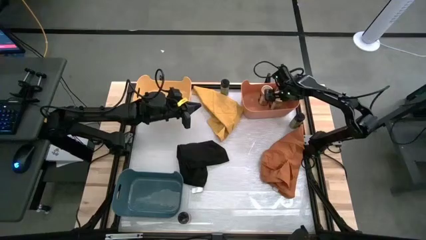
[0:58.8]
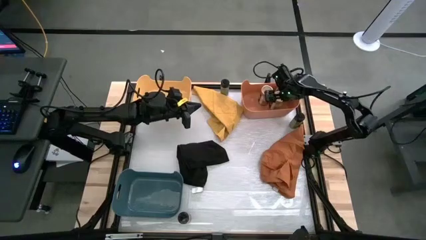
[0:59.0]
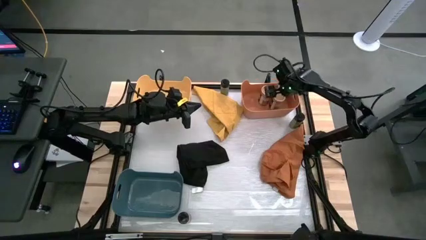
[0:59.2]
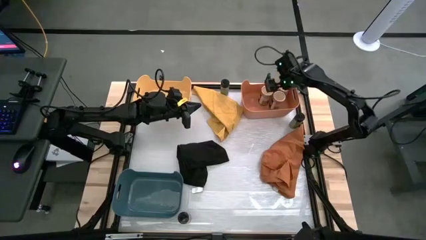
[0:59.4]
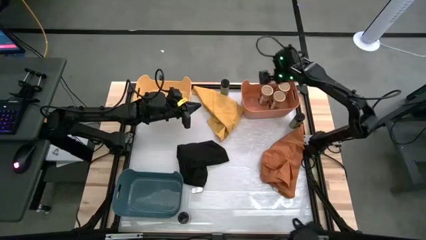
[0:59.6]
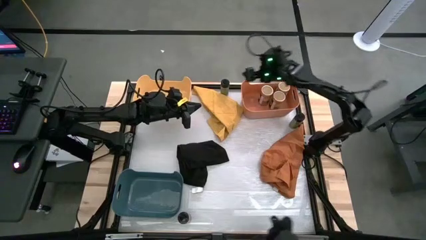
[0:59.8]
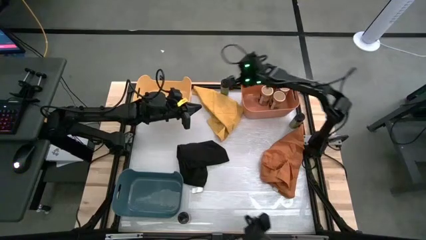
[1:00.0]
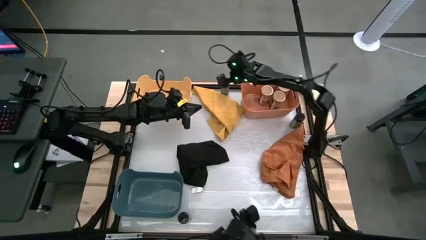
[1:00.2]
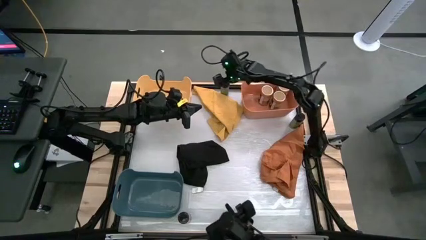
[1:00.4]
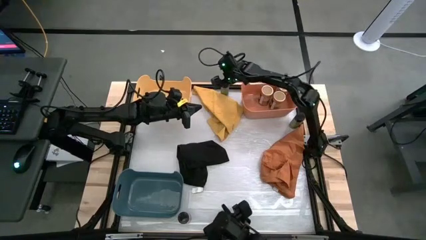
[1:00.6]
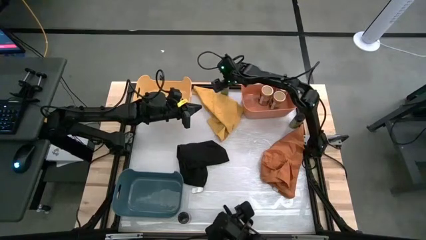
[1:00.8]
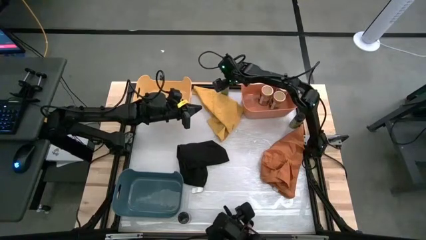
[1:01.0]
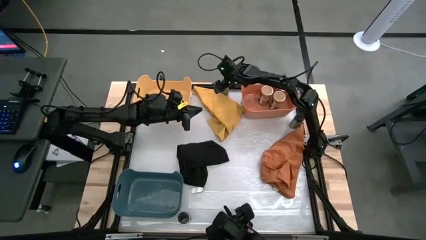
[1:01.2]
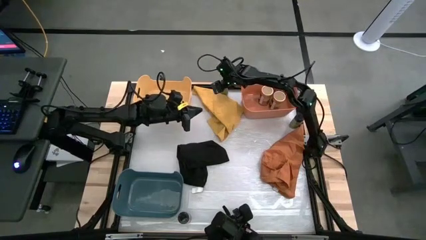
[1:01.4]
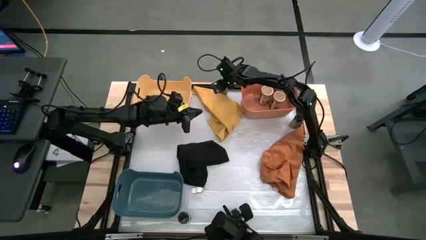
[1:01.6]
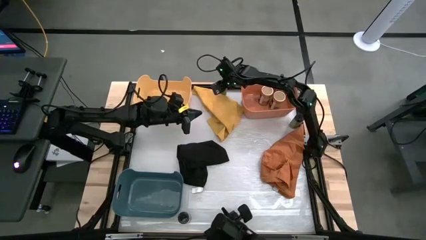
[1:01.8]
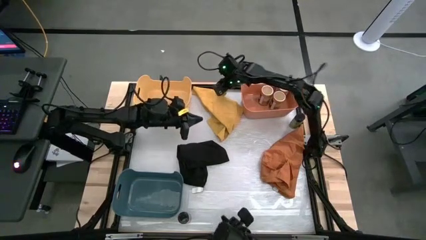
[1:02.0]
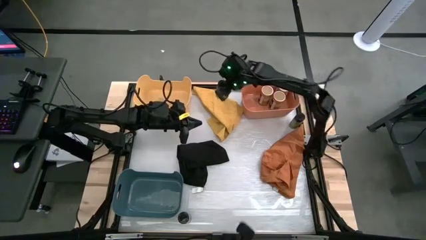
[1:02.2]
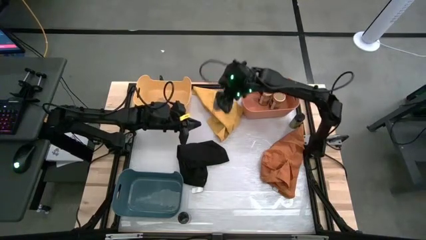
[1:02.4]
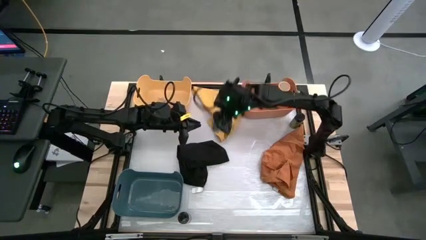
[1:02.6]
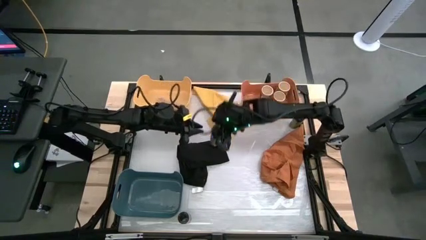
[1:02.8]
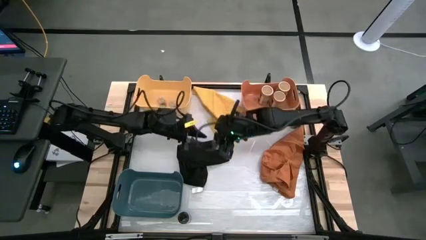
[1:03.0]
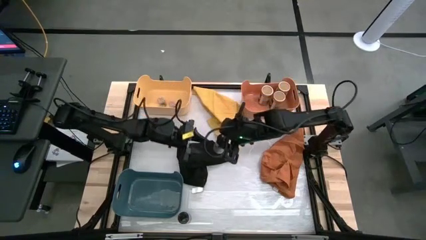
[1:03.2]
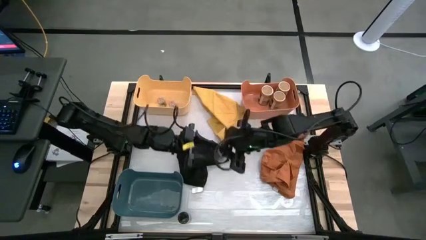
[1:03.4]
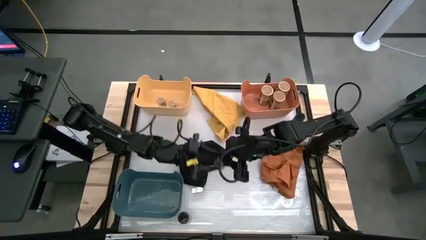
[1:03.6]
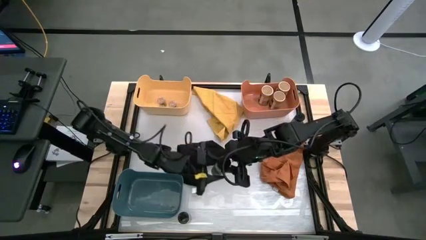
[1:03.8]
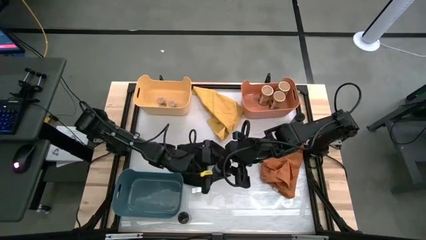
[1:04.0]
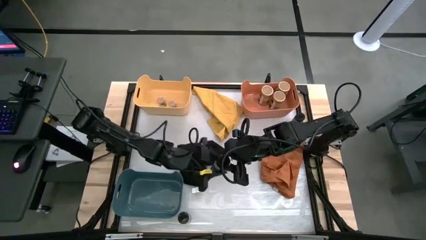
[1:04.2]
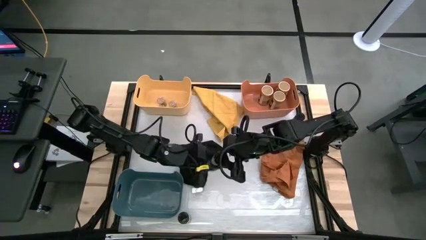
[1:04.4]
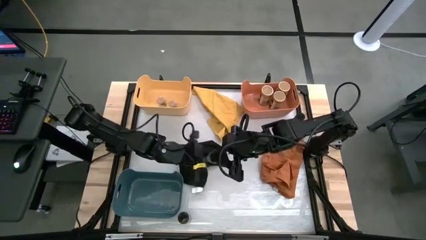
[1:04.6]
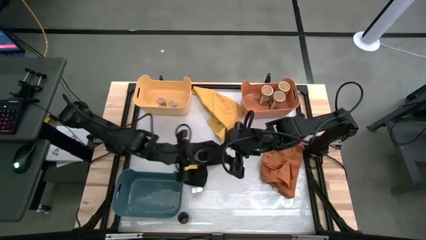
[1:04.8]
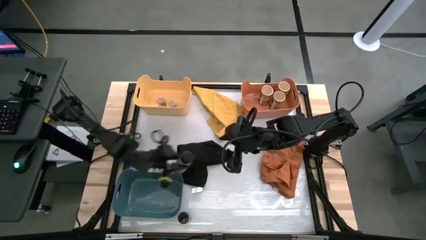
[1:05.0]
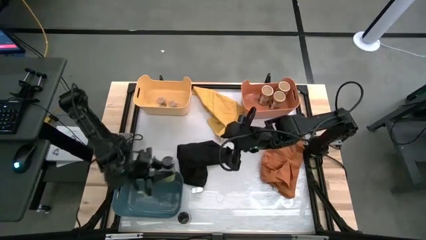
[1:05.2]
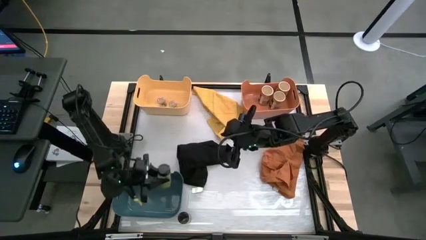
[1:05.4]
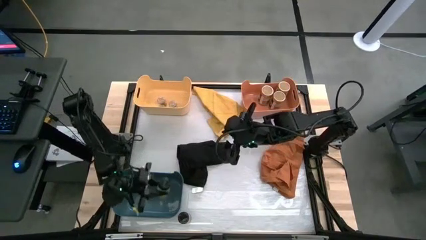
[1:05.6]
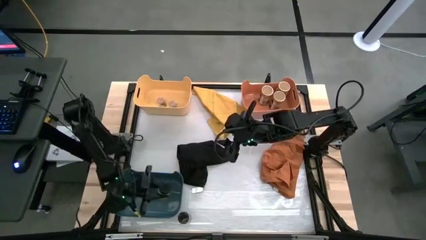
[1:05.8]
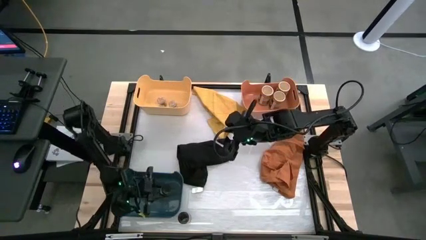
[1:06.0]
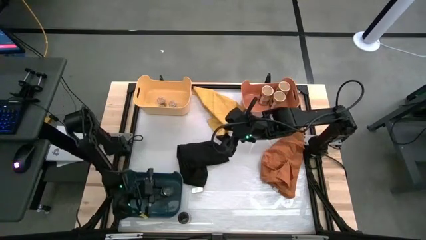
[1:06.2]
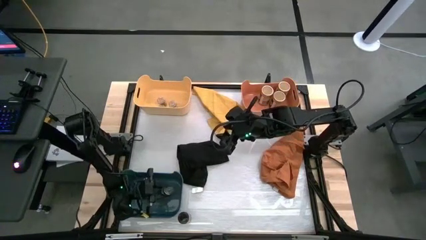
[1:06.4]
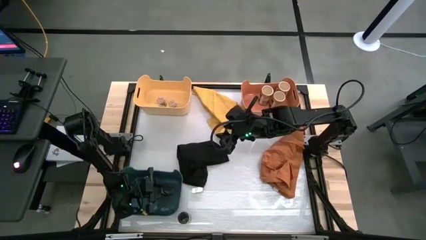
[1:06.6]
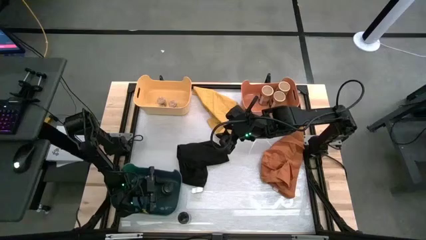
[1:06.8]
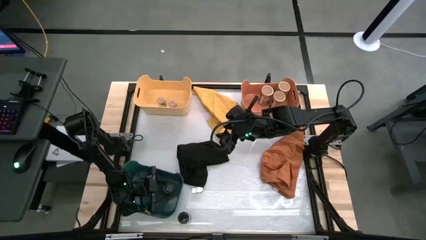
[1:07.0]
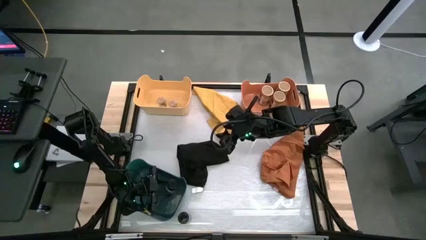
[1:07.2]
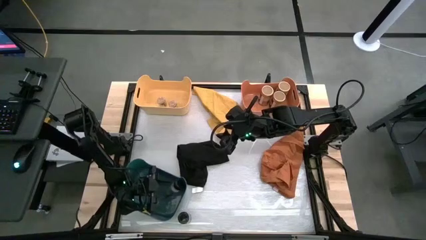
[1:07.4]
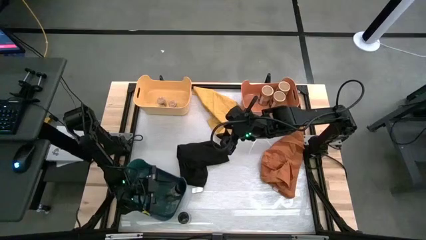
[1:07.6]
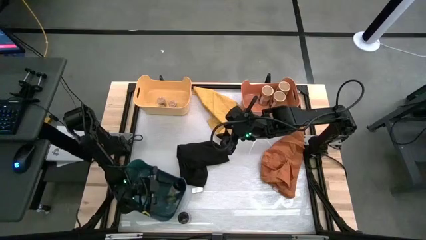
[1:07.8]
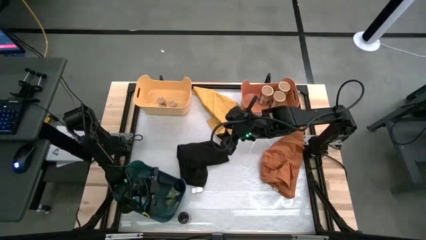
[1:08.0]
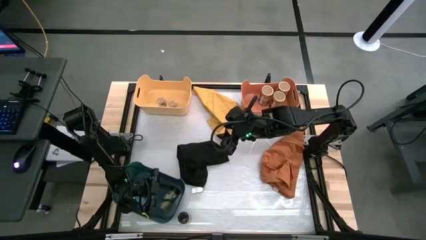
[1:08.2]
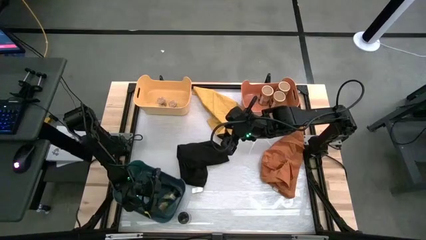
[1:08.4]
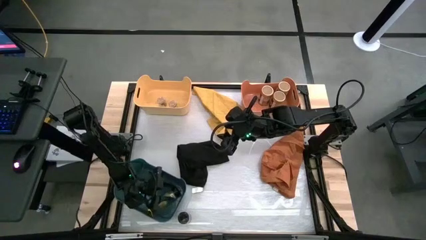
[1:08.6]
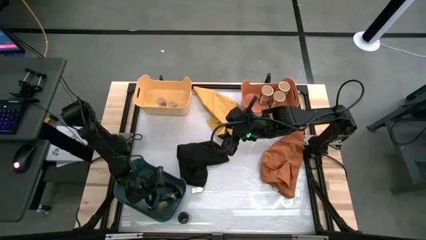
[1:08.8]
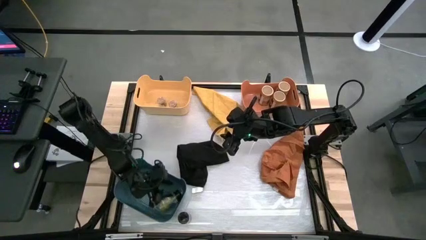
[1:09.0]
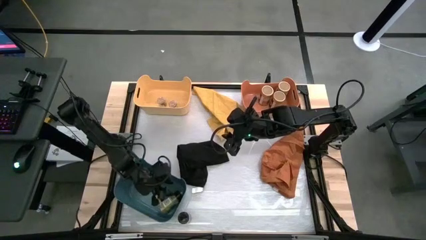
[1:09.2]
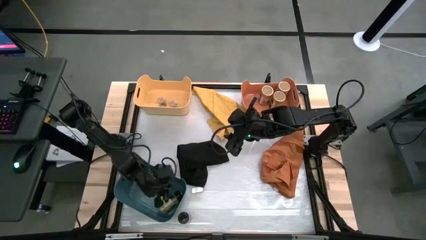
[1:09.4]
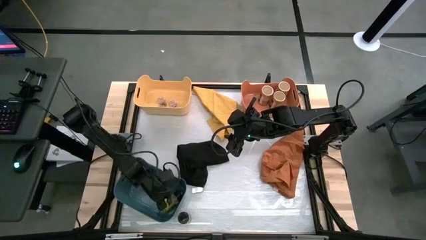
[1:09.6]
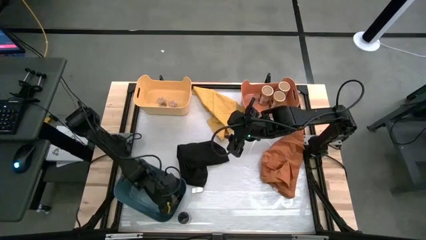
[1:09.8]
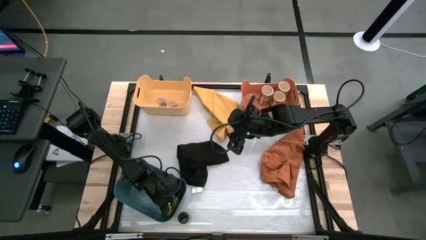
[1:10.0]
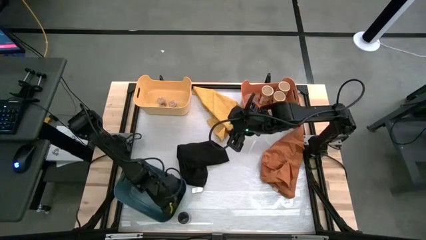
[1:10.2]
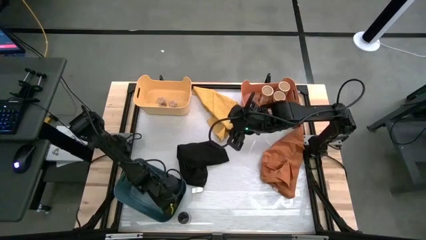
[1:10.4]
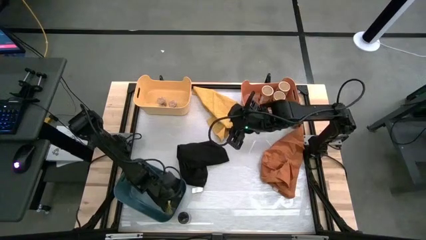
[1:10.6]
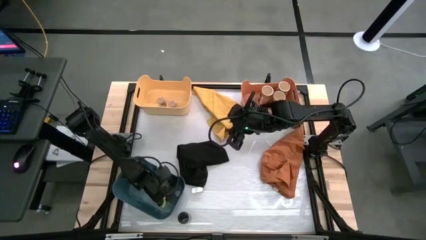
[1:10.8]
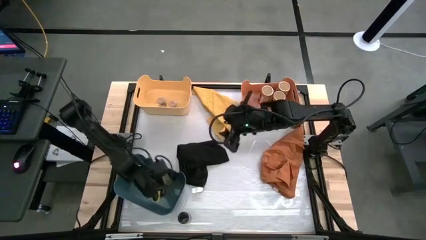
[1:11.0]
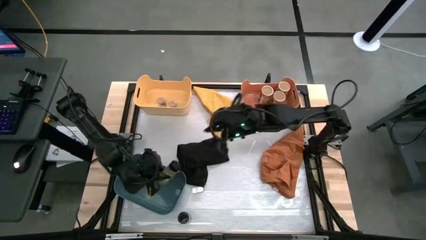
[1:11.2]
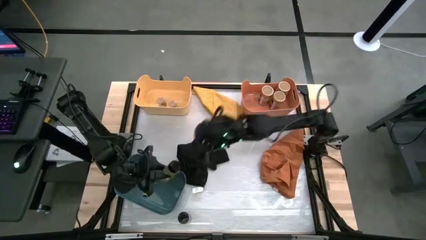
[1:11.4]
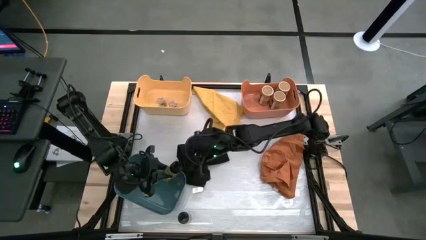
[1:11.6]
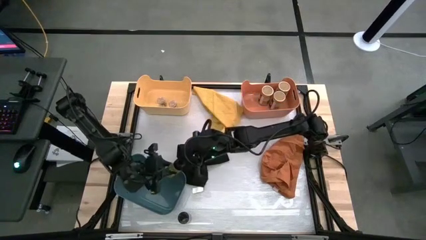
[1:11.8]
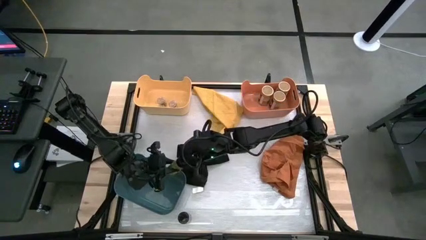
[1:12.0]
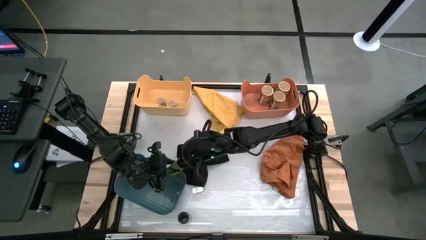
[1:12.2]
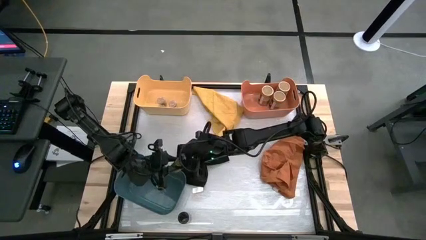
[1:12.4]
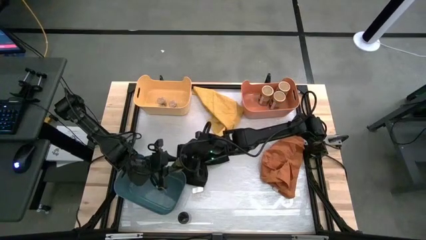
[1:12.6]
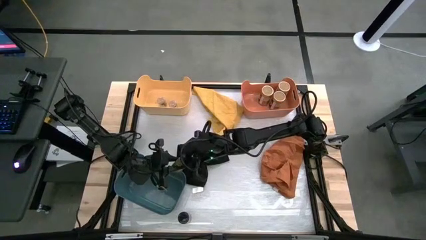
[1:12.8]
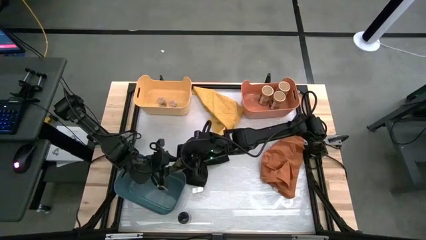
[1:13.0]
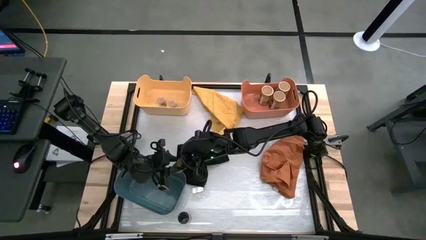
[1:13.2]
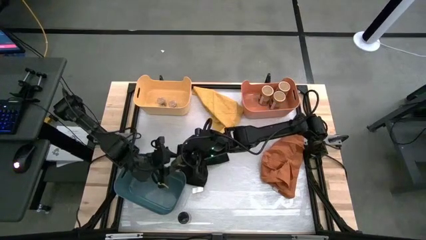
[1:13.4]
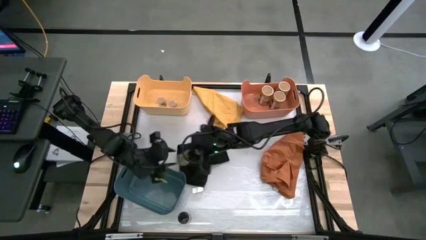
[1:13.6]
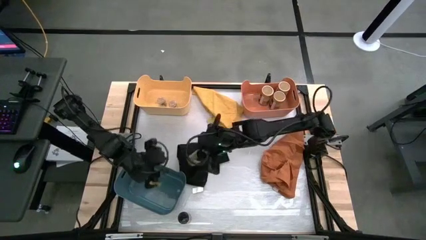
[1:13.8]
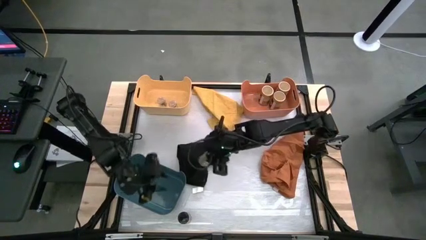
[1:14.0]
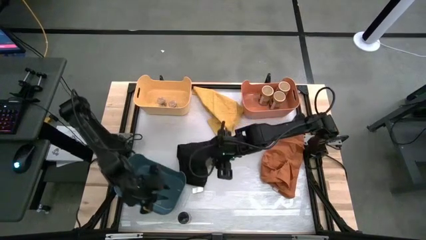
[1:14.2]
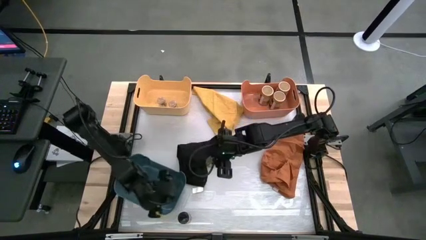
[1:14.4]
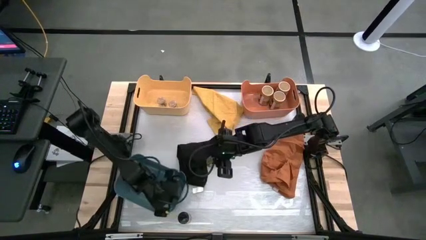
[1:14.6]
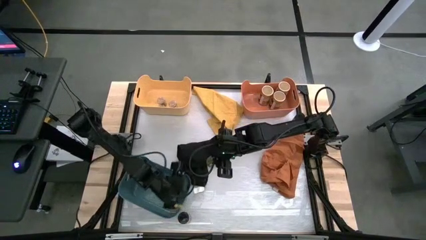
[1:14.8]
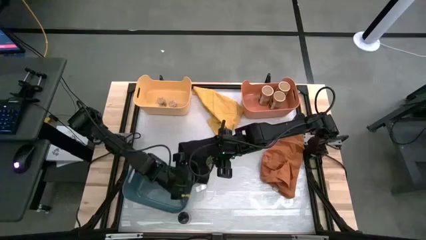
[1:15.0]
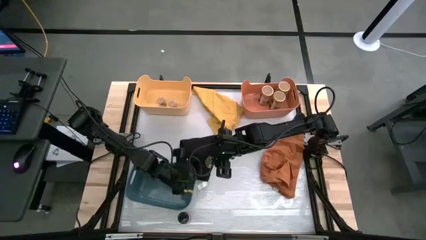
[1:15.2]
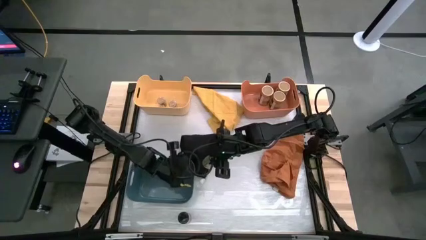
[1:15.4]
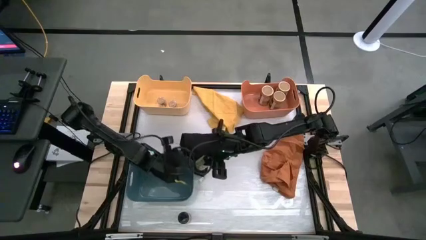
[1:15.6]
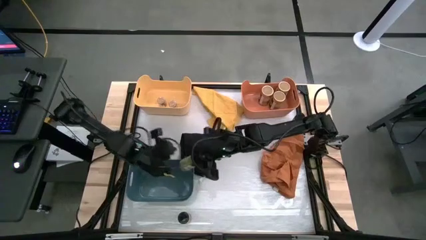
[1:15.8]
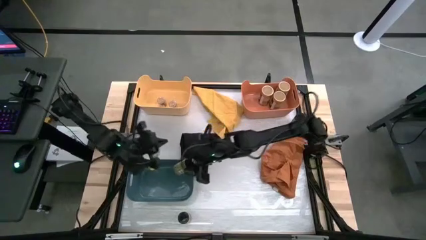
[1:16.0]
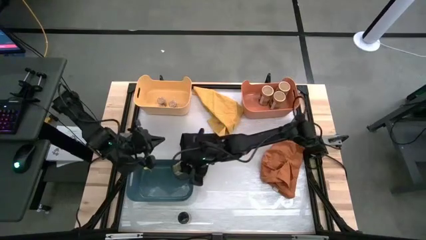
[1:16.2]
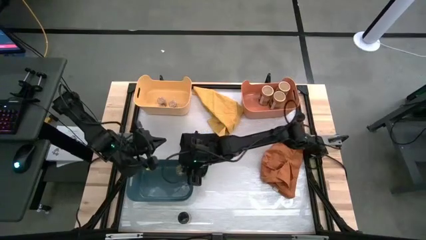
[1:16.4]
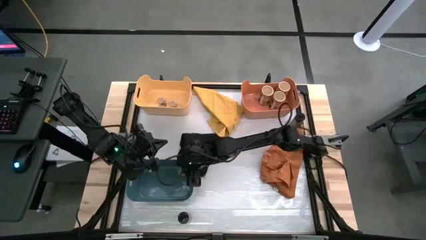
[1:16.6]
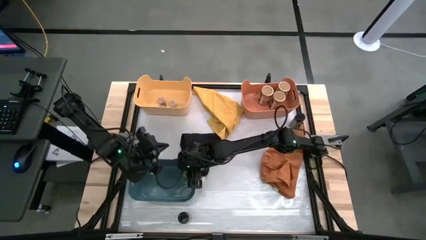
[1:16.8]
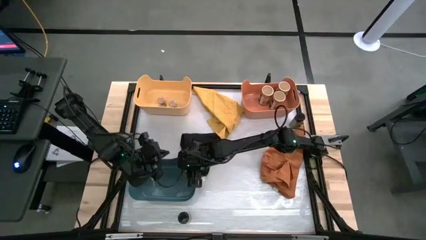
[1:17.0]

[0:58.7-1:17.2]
Task: Sort spices by type
Put the top black seasoning bottle into the blue bin
